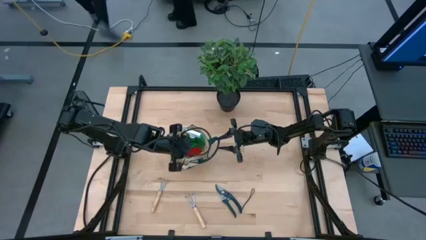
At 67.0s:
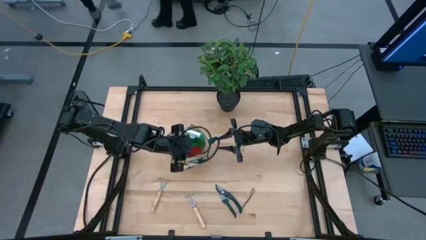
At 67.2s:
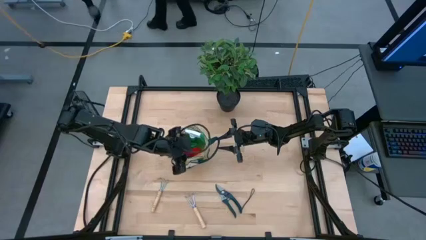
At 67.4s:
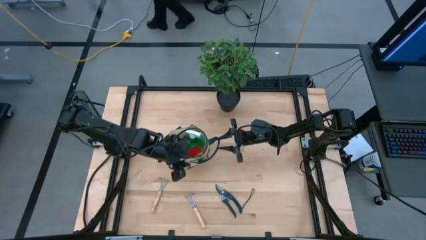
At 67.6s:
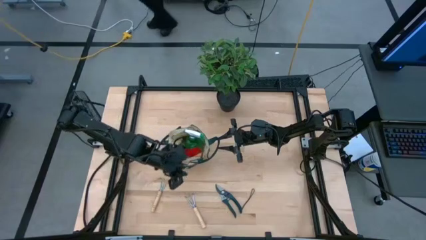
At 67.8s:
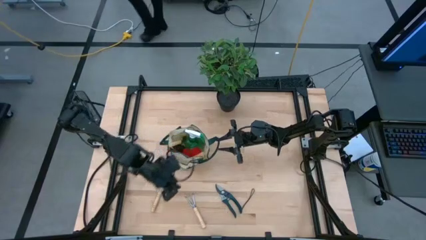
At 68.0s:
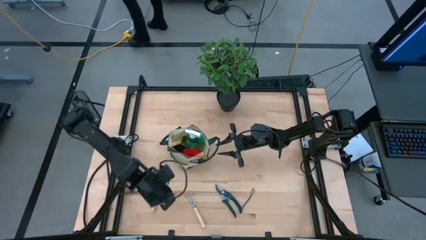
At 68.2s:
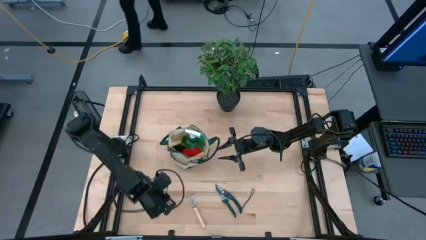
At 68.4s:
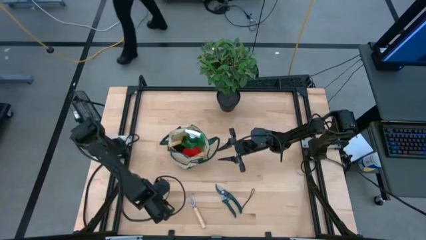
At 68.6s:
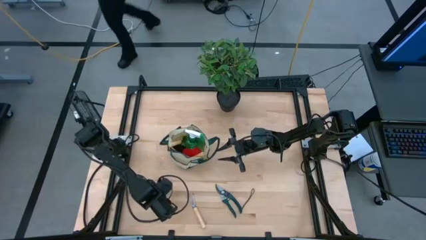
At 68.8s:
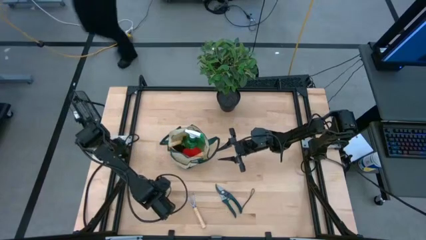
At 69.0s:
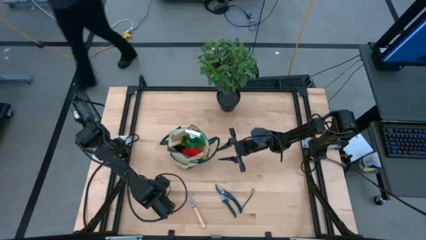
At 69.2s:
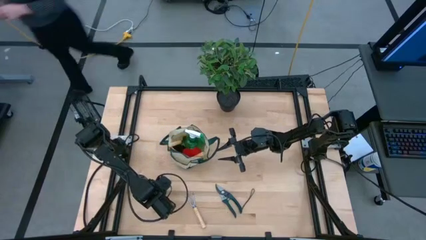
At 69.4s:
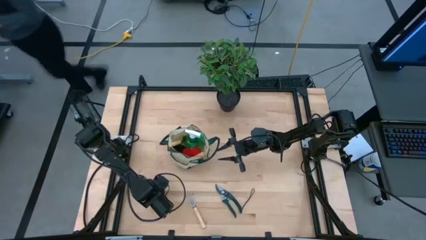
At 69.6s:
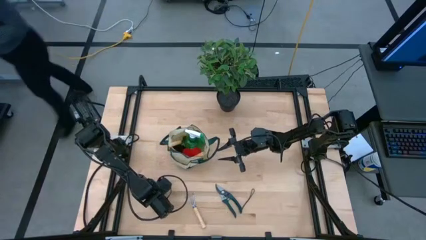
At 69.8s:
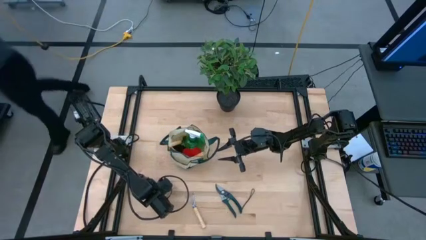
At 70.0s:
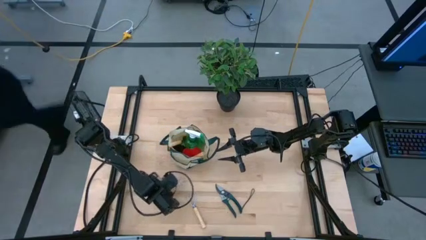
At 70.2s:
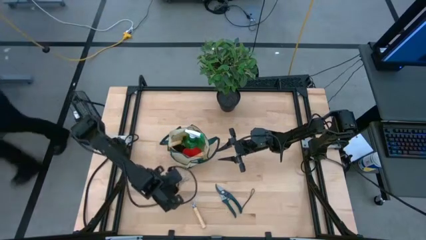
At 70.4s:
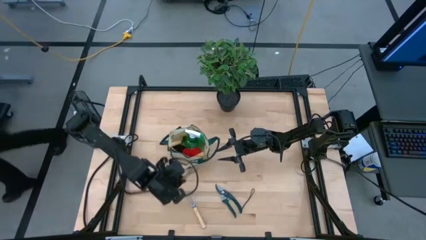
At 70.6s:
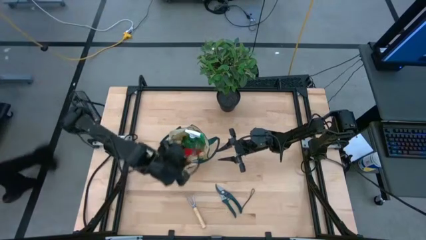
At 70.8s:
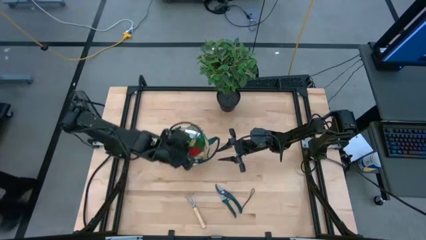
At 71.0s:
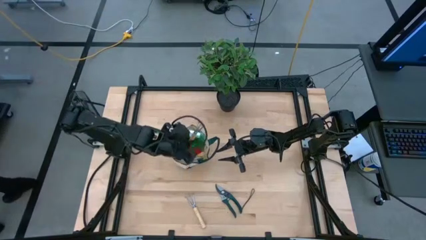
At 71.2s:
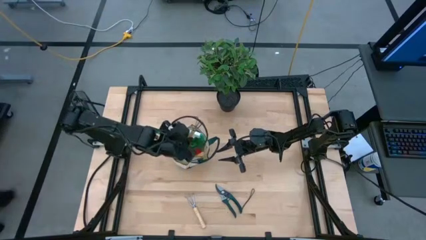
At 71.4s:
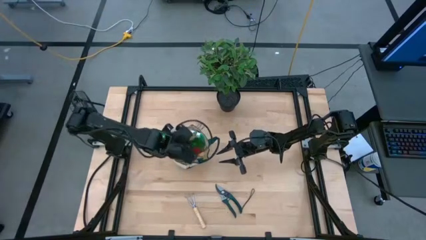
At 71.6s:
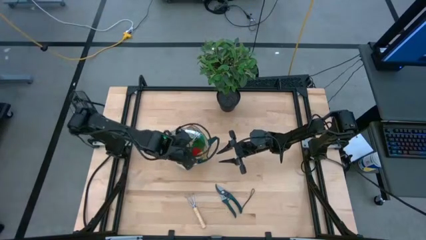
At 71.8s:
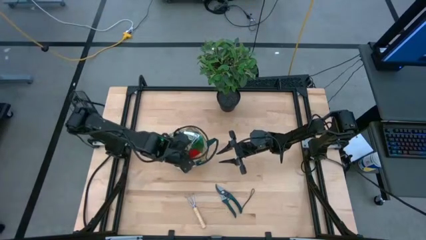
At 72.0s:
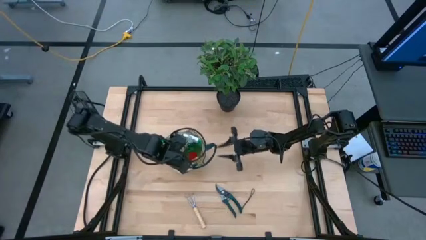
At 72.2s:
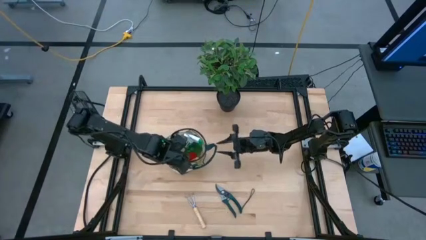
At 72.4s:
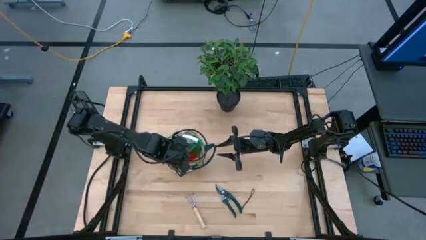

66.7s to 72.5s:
Task: Pick & Place Garden tools in Gardening bag
Put the left hand rake in the gardening bag

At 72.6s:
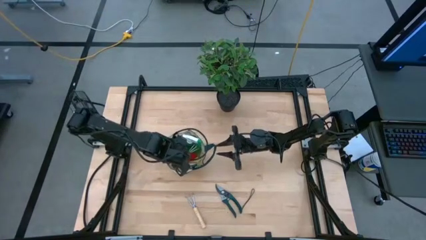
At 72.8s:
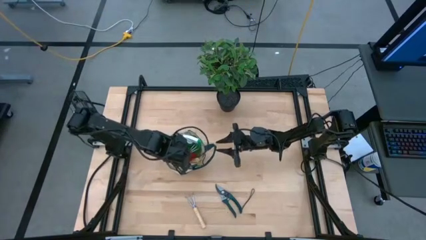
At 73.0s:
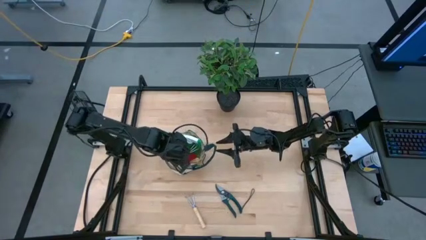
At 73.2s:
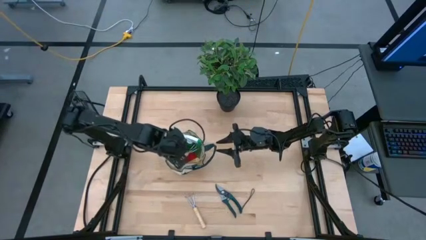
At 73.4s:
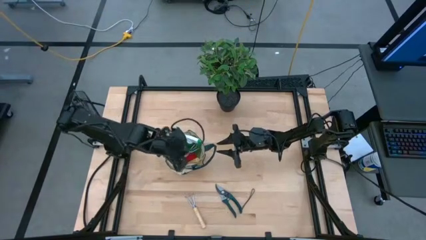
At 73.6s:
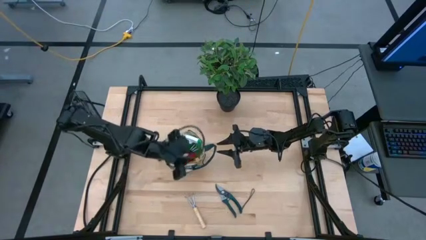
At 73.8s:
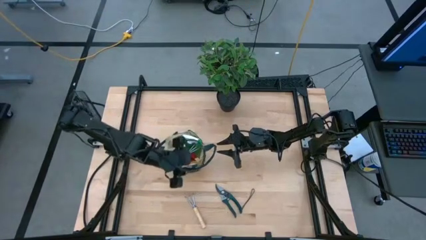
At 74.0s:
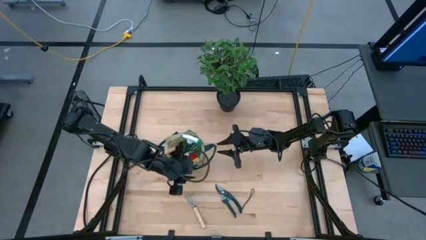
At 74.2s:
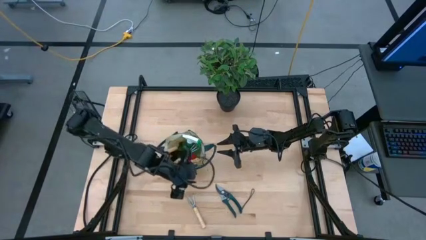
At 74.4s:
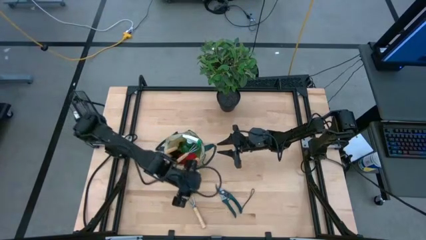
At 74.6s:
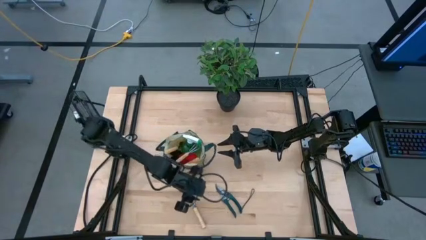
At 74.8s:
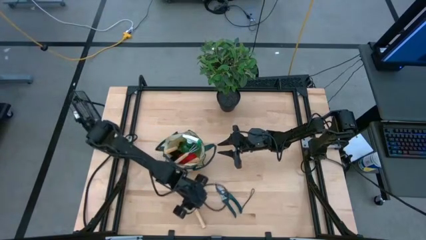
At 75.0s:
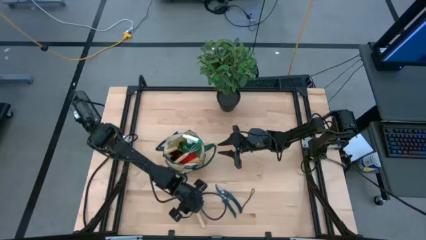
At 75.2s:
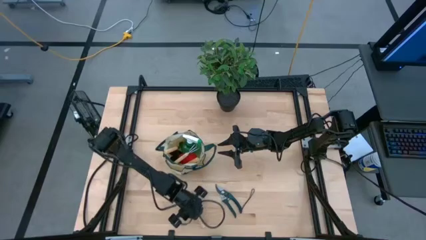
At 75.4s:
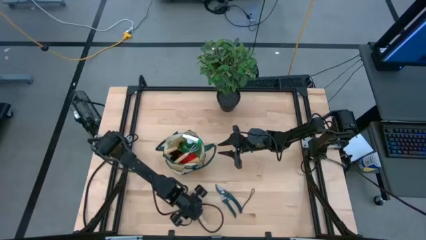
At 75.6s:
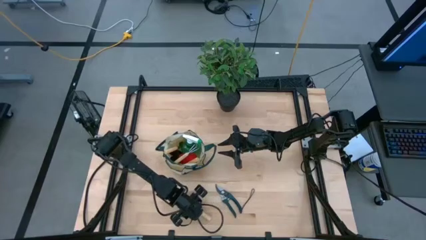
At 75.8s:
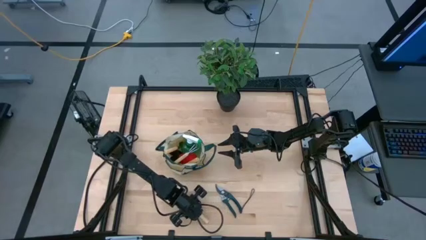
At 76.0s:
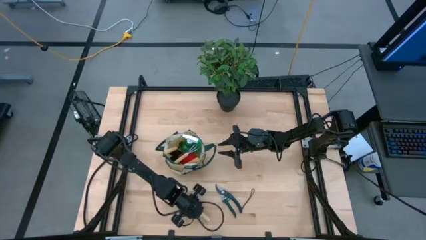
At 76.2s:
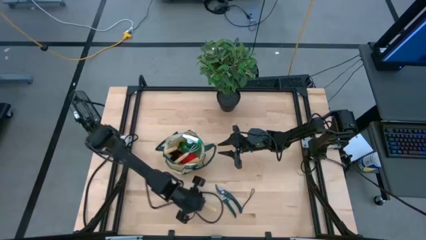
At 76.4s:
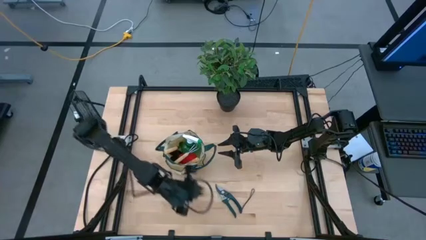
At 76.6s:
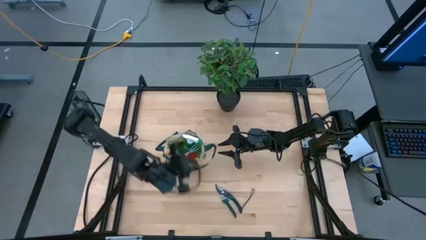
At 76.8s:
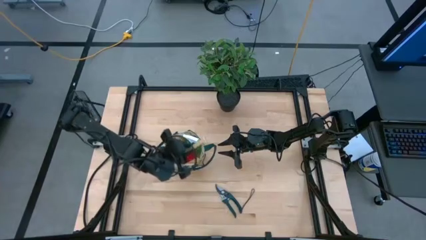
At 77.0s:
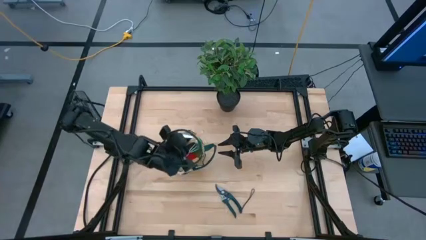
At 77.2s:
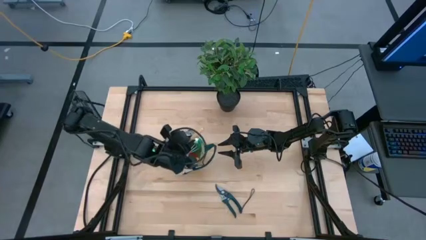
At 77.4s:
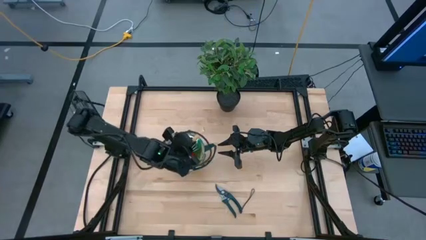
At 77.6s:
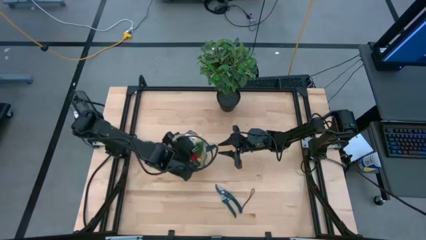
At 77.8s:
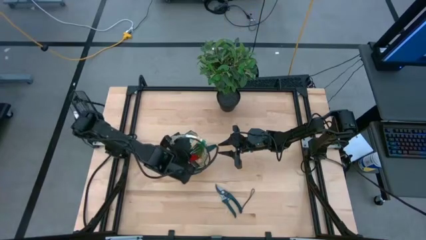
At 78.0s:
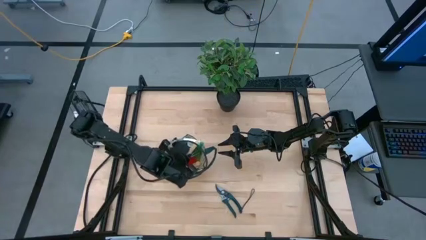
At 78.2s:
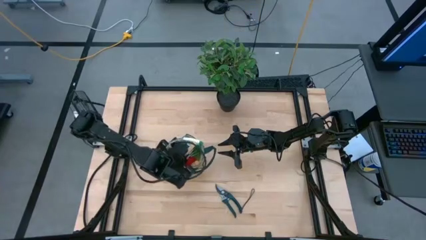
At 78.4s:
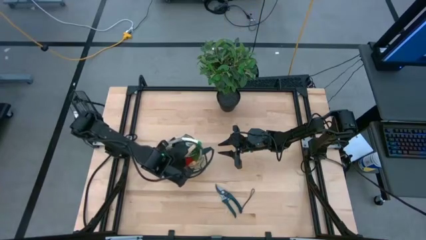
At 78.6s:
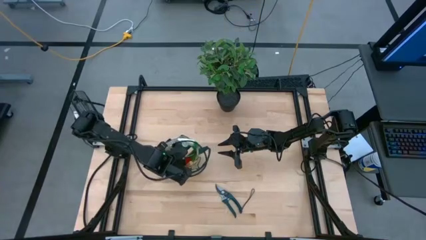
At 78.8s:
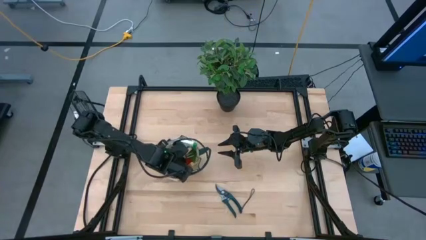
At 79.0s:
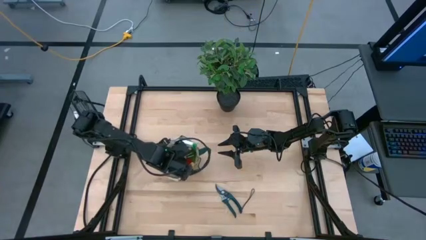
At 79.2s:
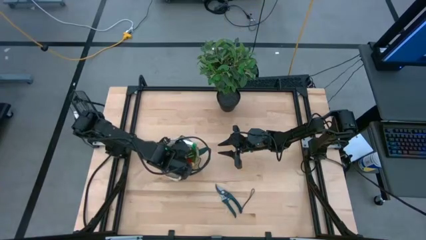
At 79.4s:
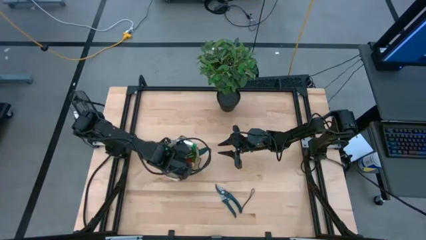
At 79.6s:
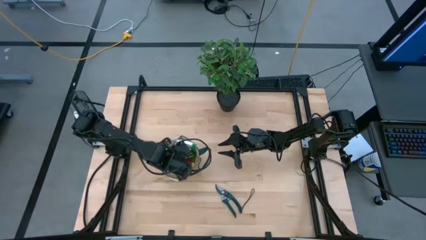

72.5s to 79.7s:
Put the hand rake in the gardening bag

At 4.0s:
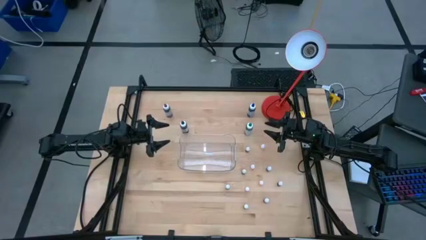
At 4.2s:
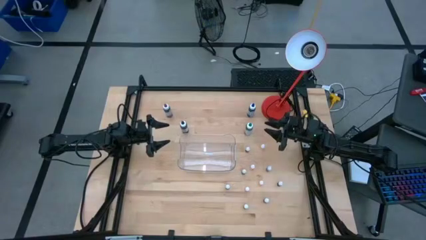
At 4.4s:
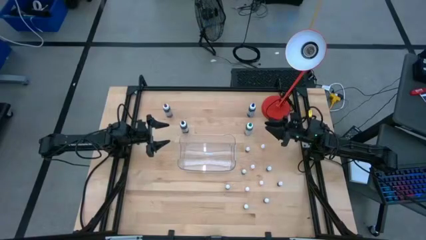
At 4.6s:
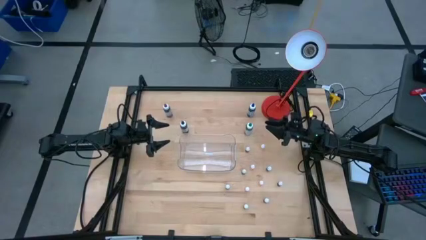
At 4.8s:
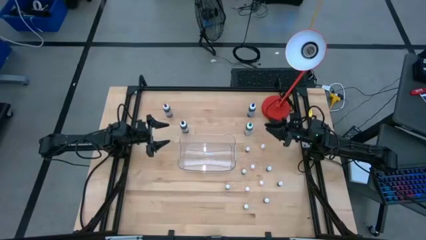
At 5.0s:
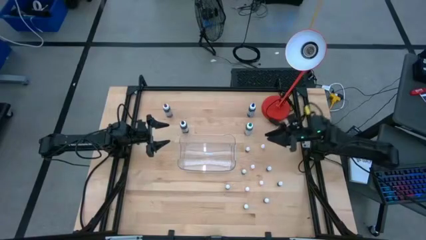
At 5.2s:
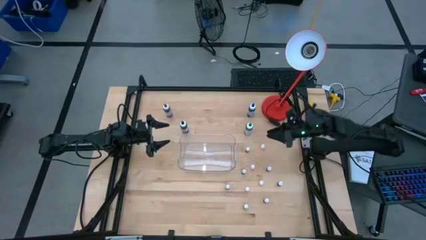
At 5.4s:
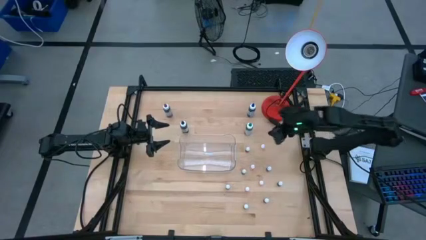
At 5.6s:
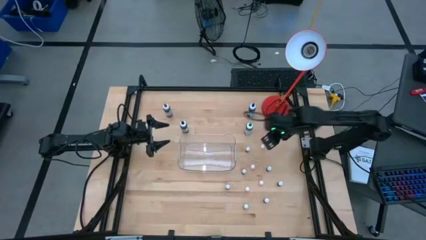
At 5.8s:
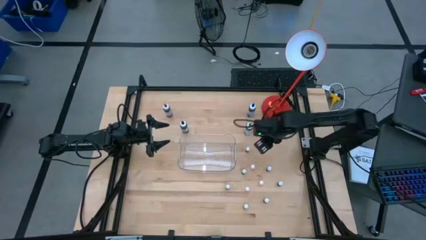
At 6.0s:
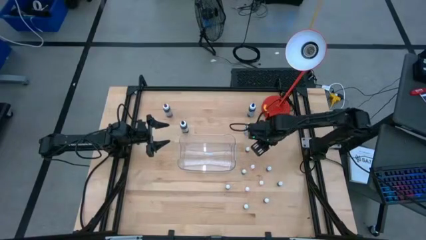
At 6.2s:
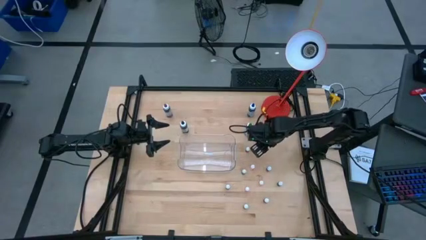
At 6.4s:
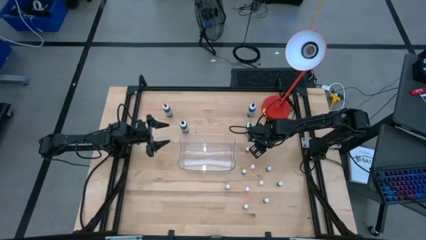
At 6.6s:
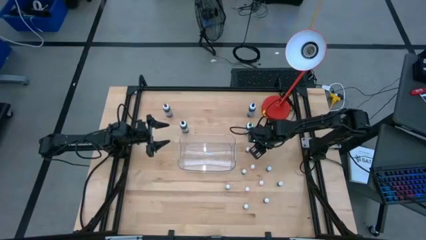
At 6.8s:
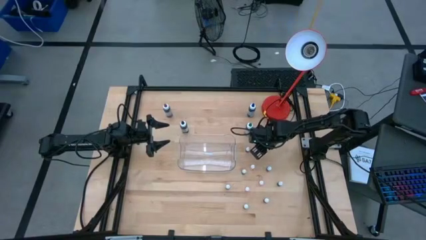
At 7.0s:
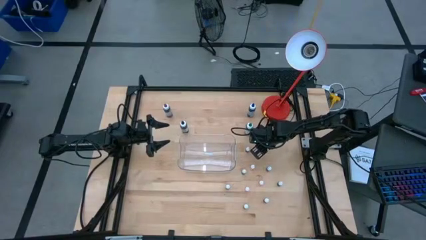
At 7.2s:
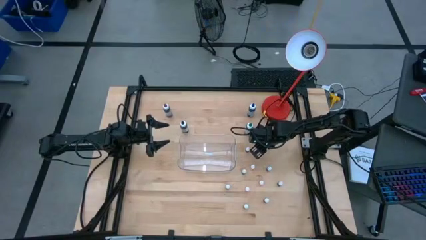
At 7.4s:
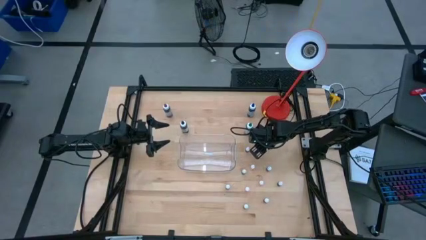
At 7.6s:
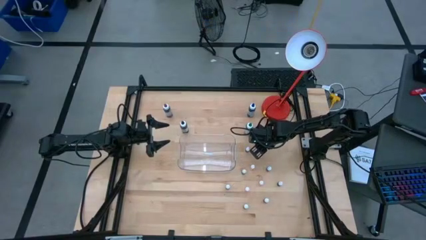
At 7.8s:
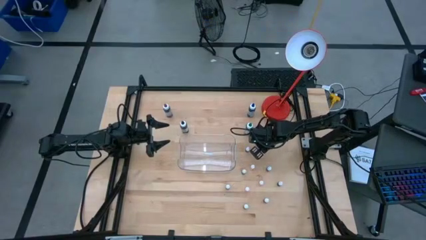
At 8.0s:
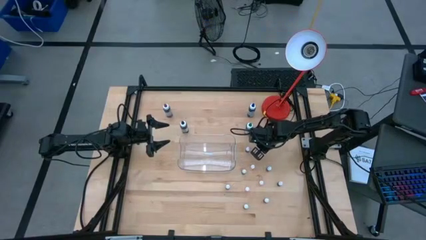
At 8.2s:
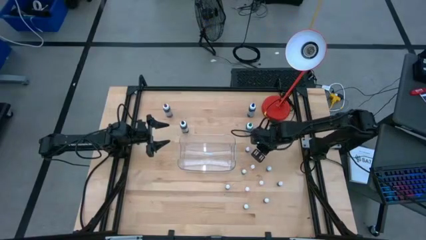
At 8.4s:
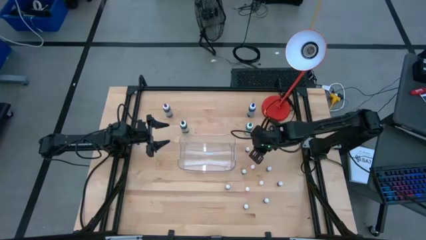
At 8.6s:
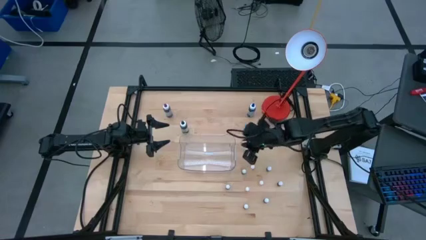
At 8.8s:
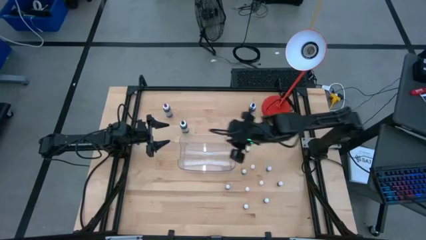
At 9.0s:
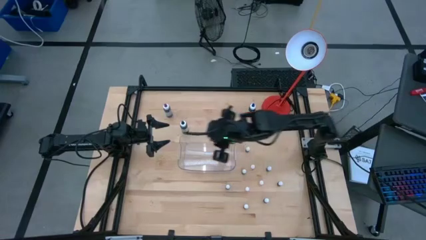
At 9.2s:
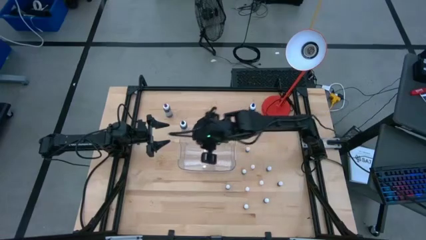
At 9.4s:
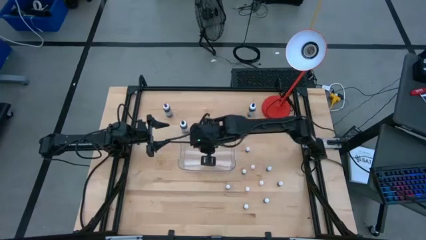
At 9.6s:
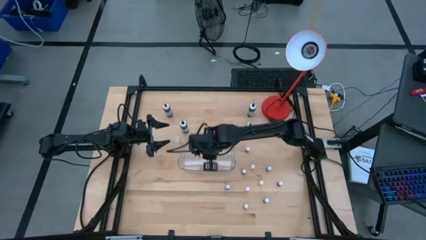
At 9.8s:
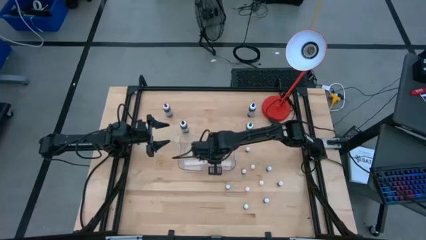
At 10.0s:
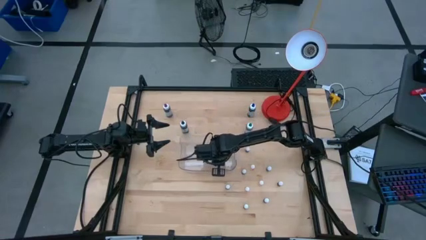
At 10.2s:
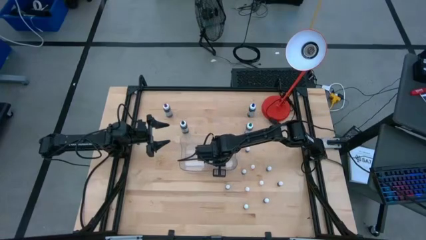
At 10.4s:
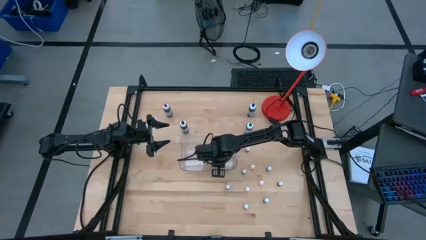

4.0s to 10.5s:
Task: Pick & Place food coloring
Put the orange food coloring bottle into the transparent bin
